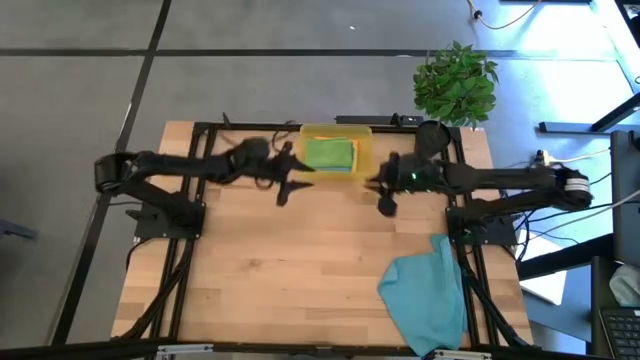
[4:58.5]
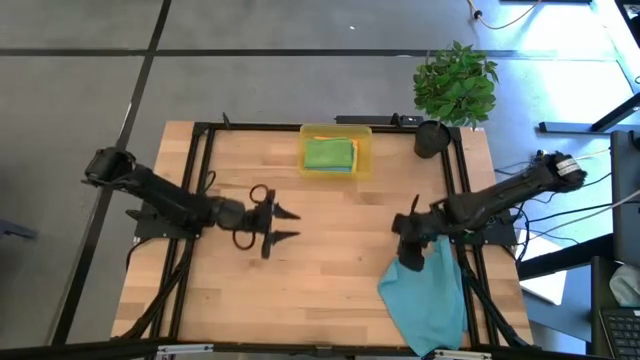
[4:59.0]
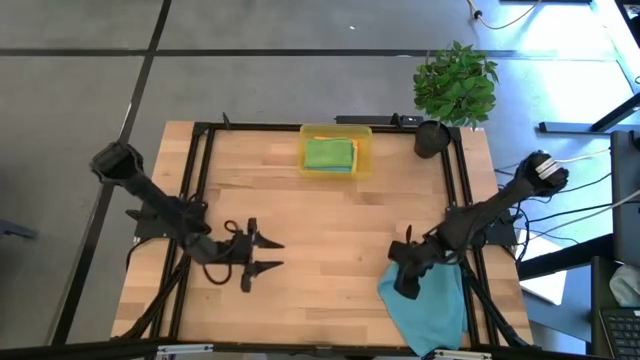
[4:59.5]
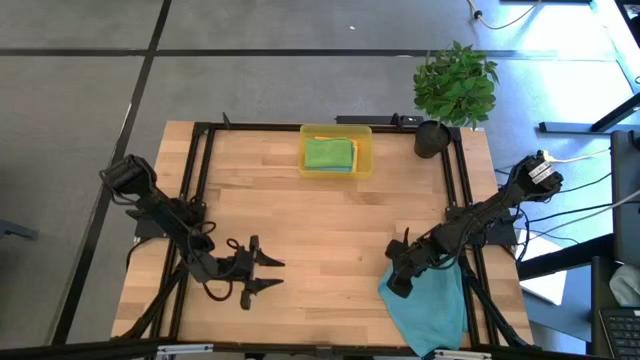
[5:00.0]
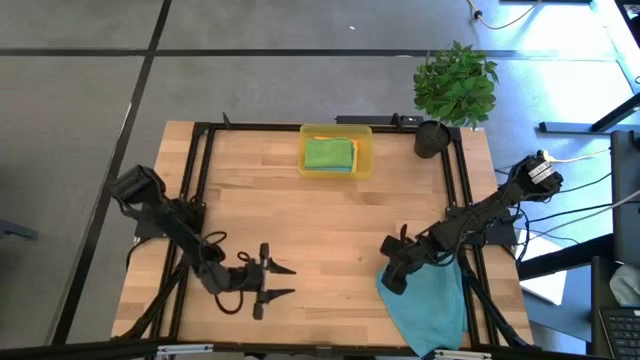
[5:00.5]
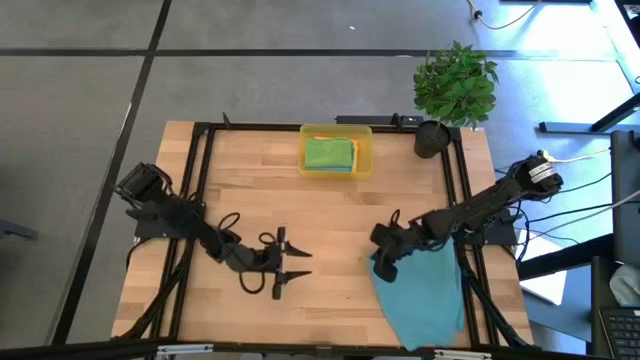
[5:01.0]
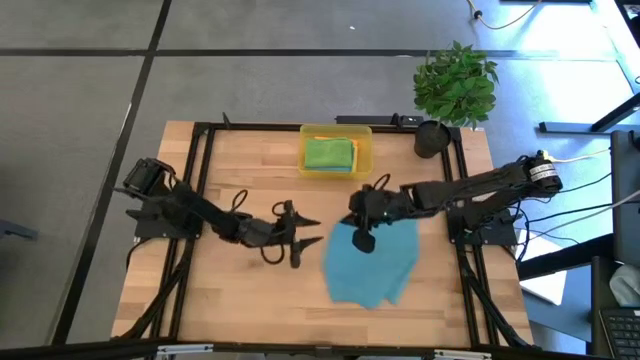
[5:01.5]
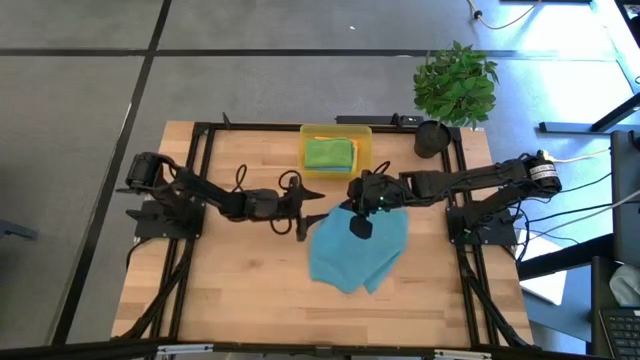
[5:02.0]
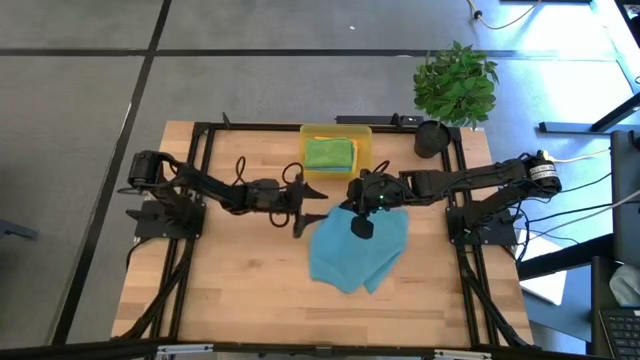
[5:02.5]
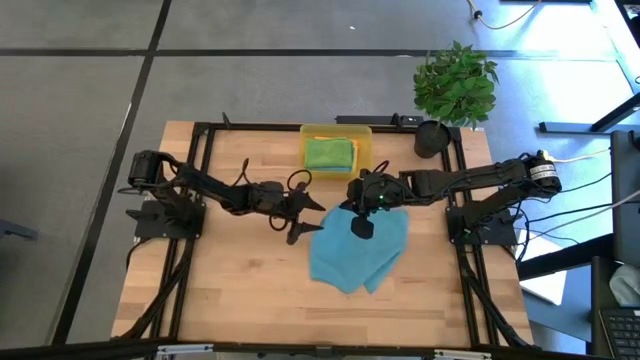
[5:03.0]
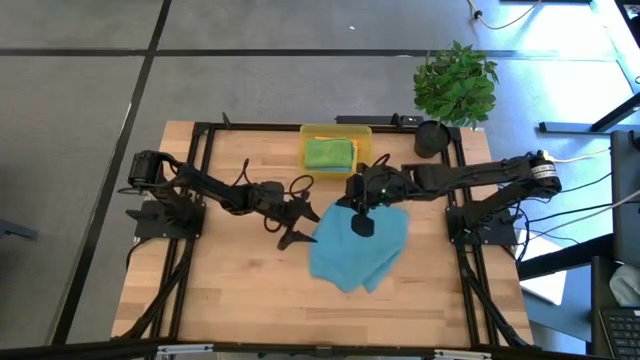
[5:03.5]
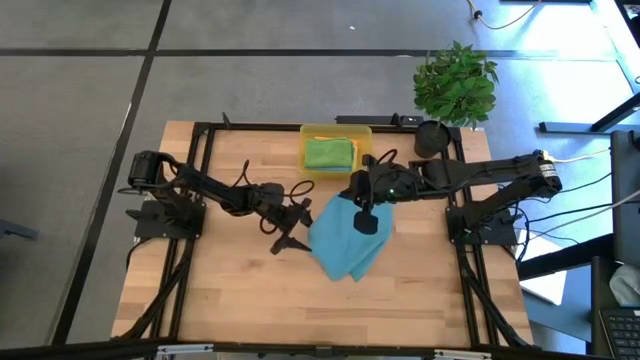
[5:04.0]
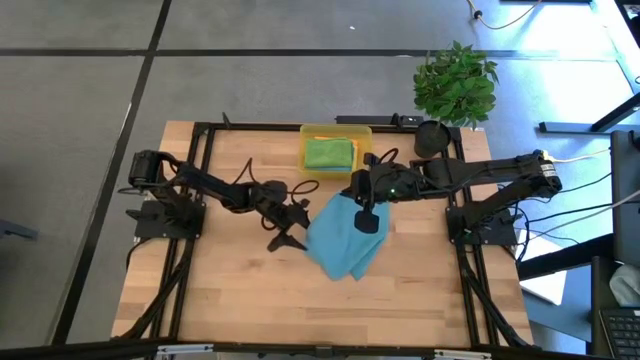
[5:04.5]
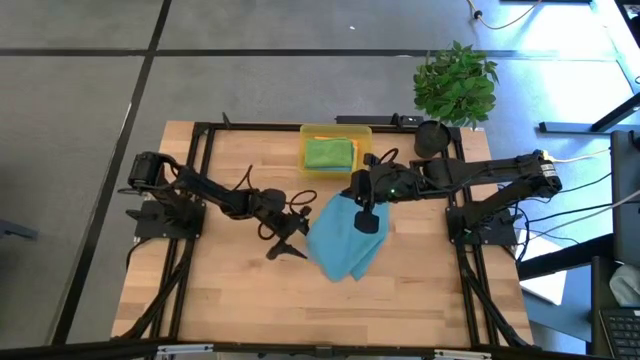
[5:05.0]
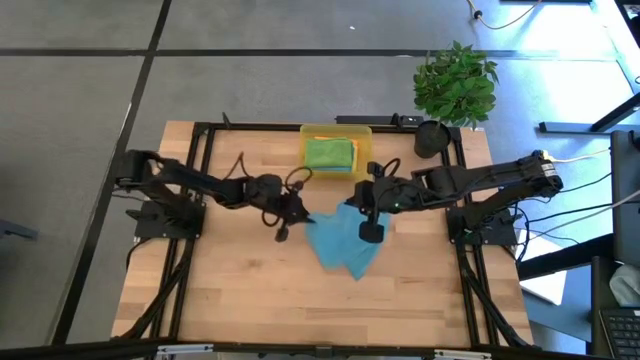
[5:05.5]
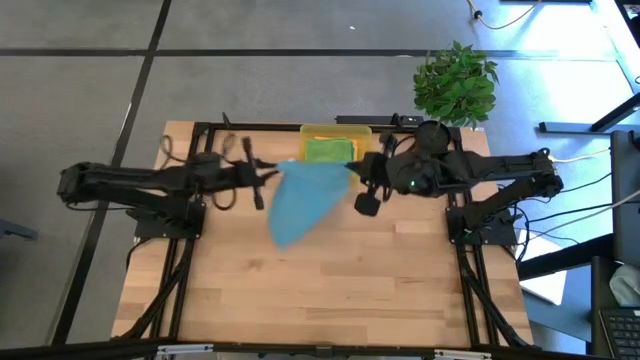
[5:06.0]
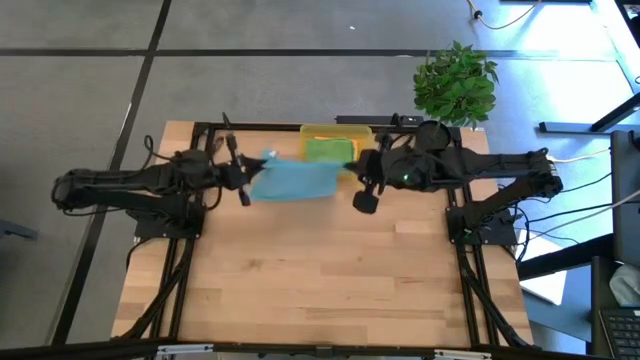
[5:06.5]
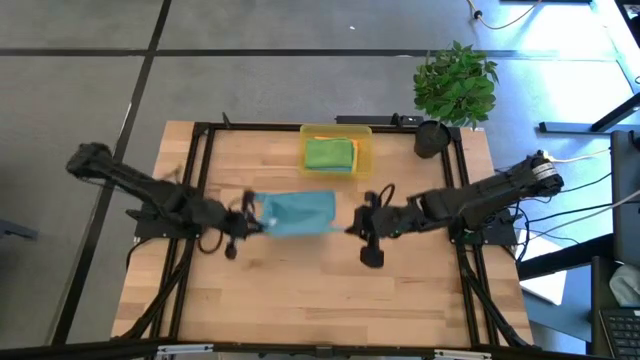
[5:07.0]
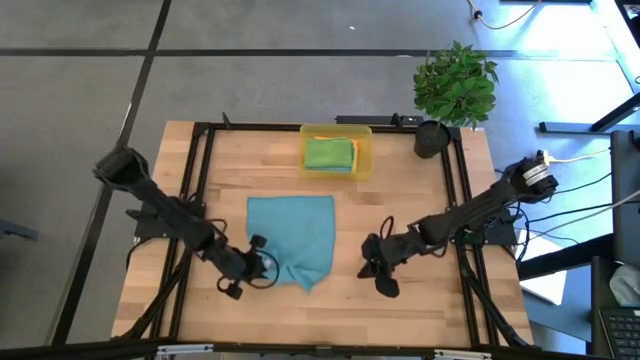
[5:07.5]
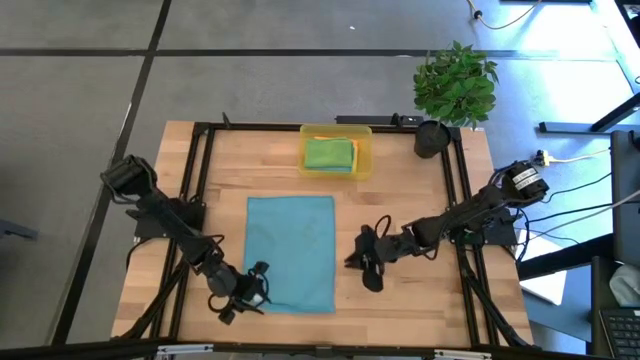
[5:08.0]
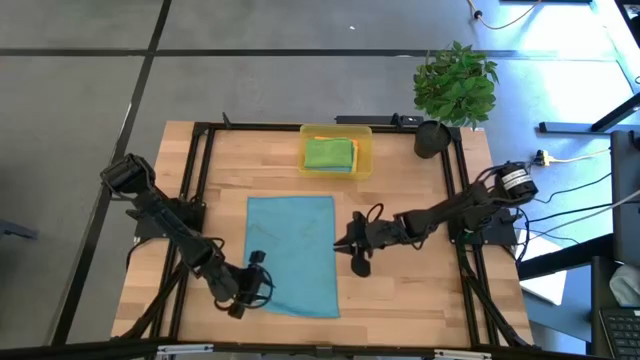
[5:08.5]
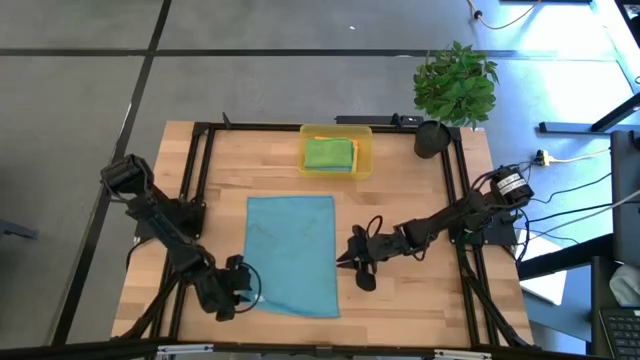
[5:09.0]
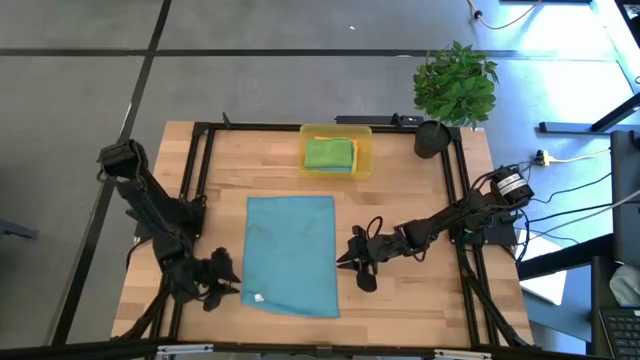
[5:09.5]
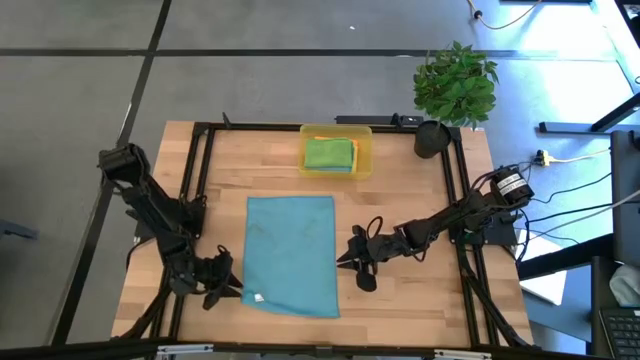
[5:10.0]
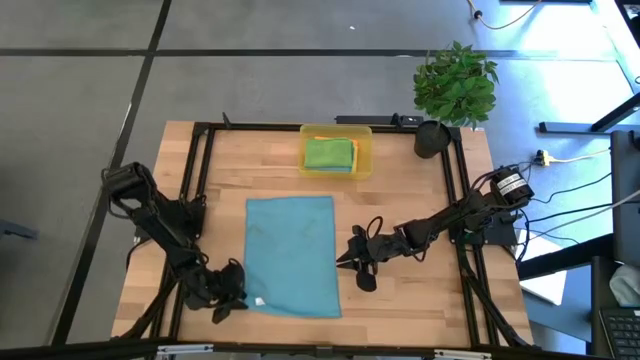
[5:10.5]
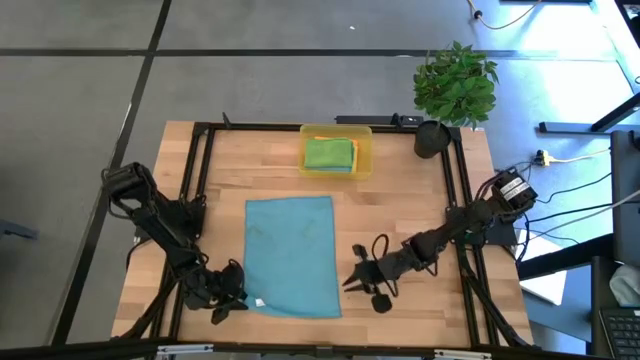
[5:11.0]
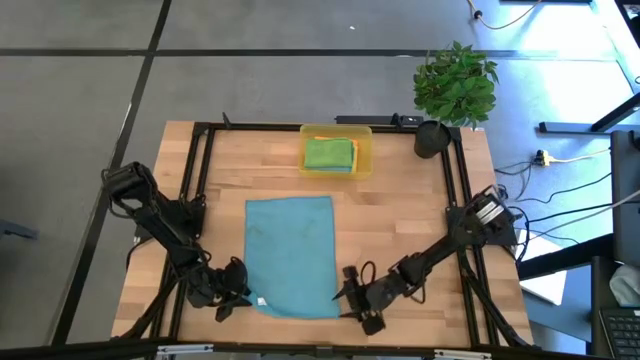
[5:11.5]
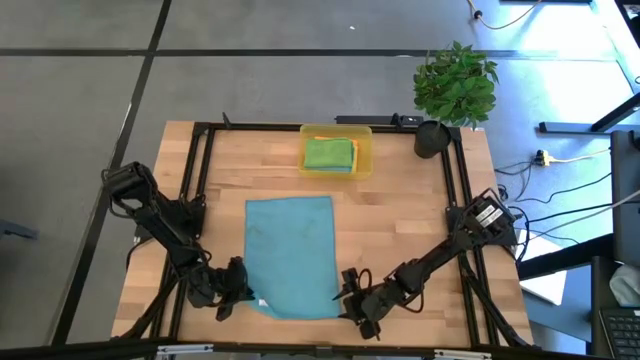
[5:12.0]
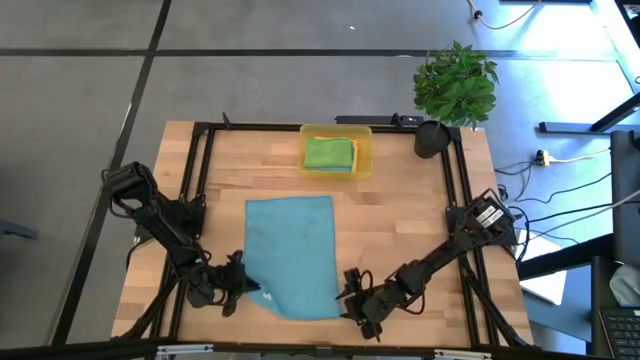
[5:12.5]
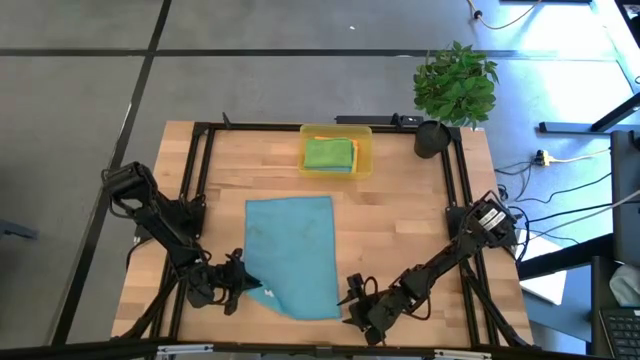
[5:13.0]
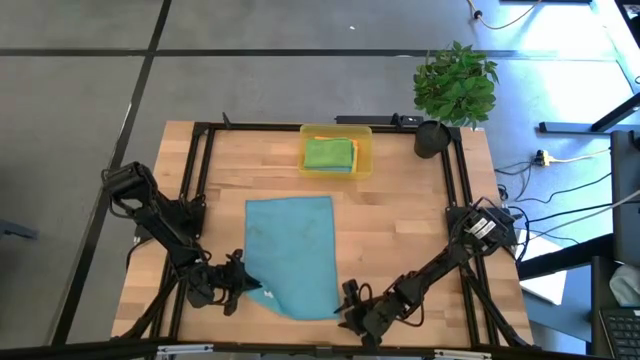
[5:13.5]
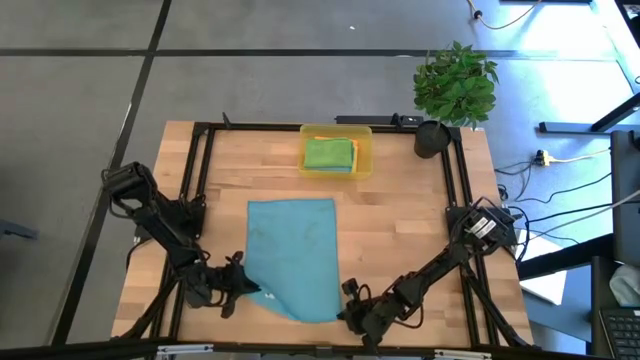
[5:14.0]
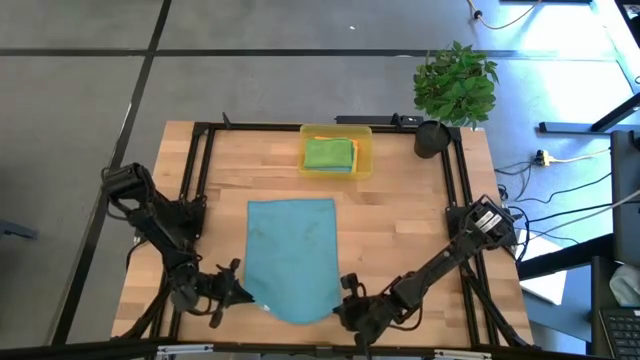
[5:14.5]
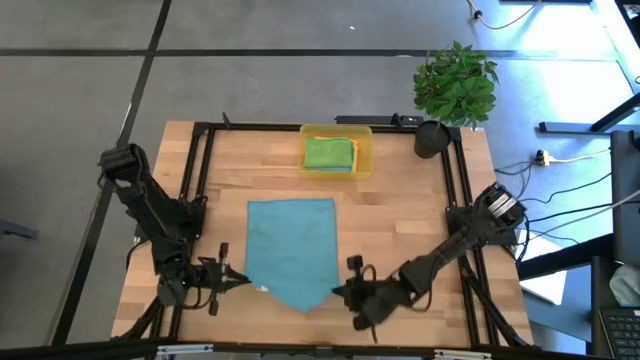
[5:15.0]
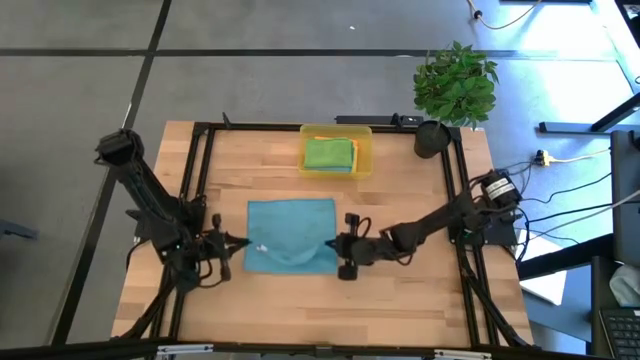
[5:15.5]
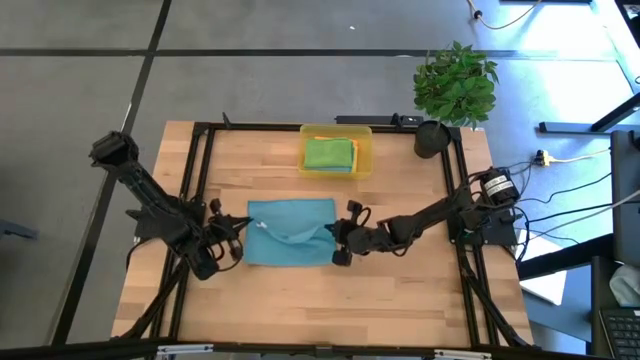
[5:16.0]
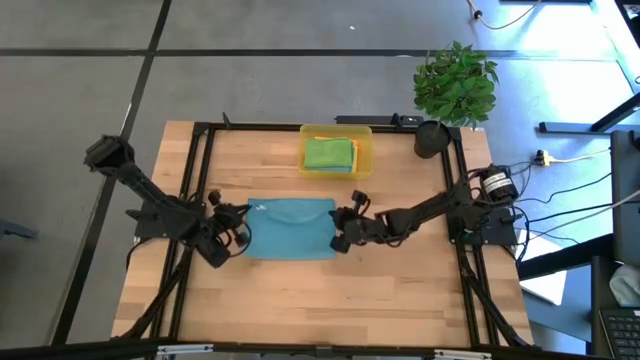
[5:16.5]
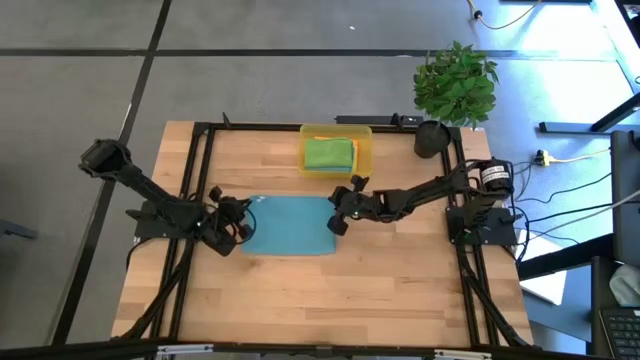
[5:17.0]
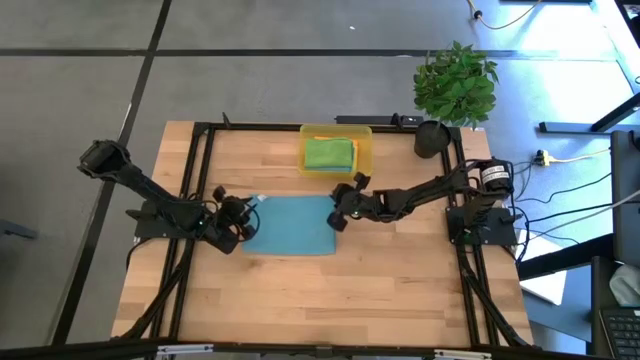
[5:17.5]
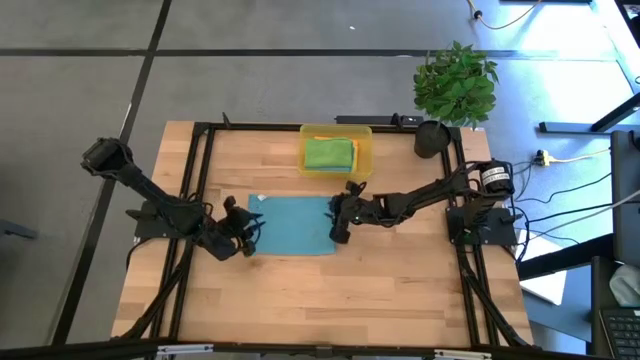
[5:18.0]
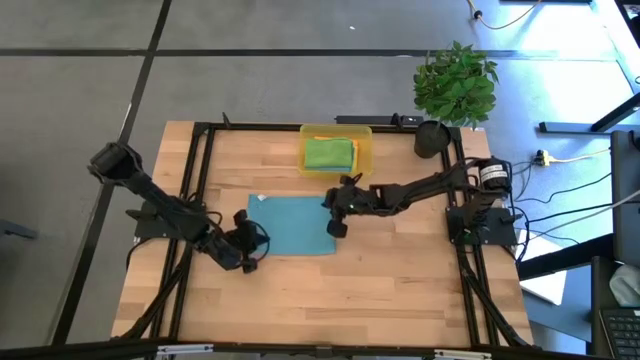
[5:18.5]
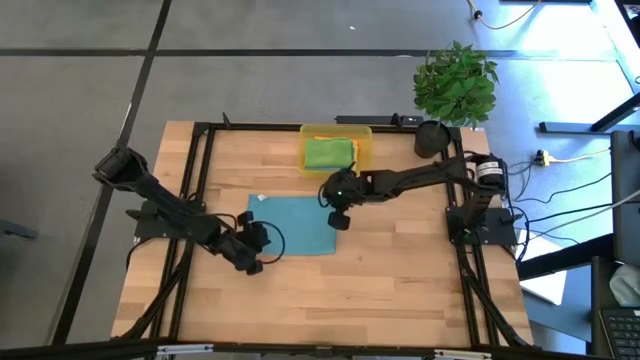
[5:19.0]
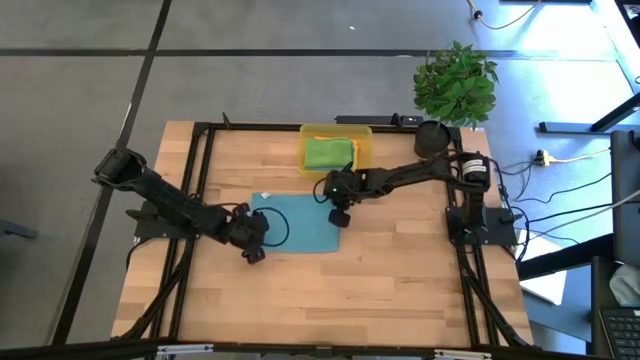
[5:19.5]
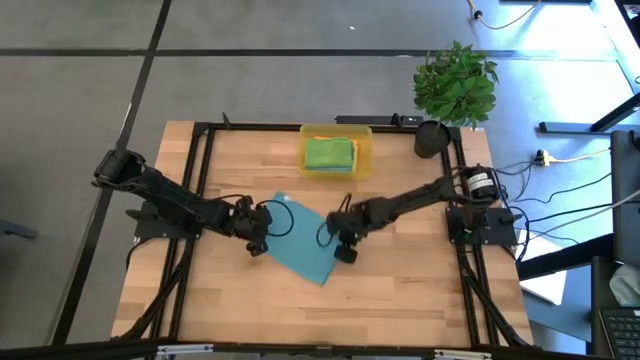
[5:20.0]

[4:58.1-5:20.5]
Task: Fold microfiber towels
Fold the blue microfiber cloth

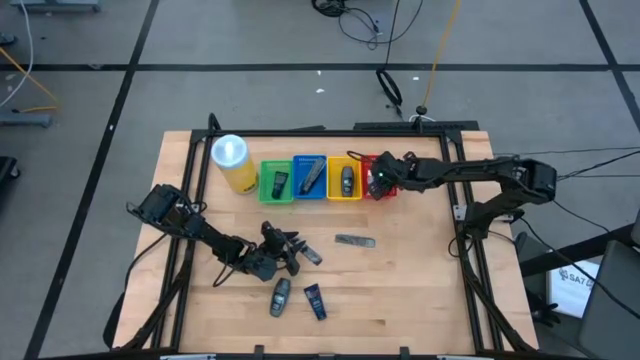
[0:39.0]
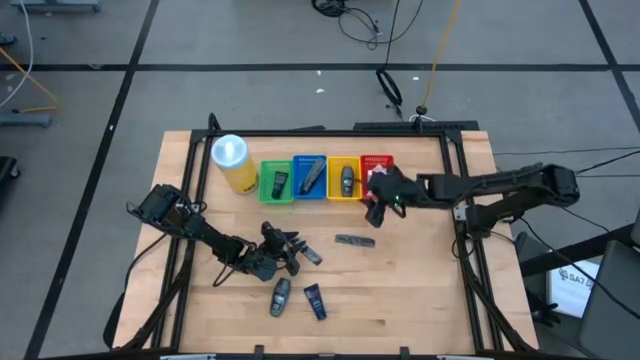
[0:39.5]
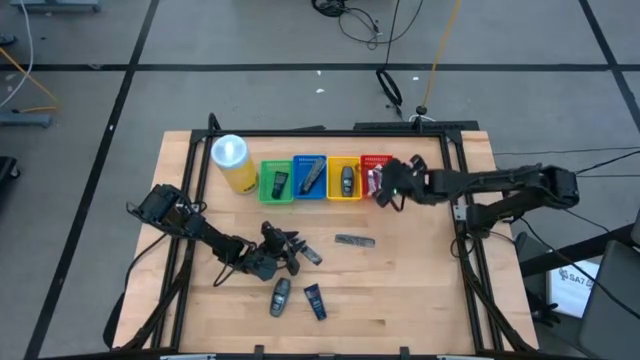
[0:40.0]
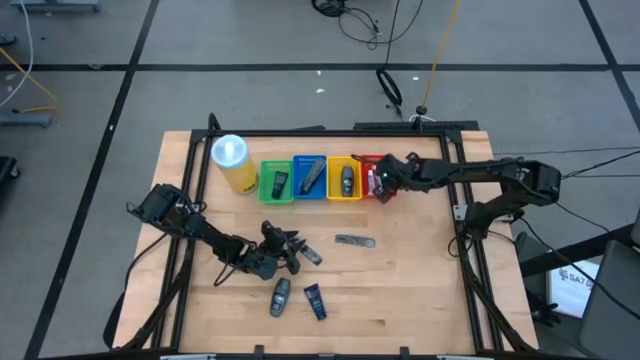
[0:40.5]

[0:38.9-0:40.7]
Task: Pick & Place Travel size toiletries
Adjust the toothpaste in the basket
